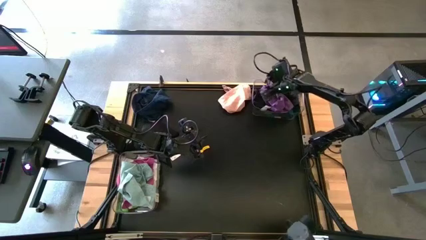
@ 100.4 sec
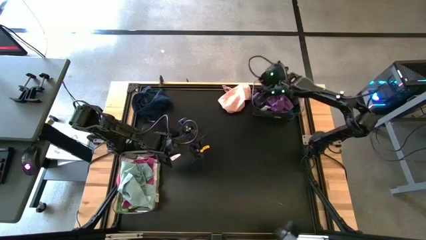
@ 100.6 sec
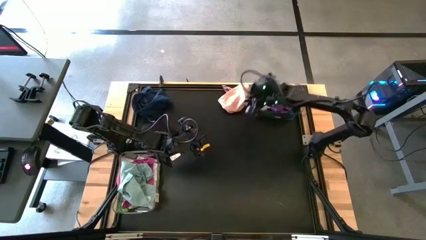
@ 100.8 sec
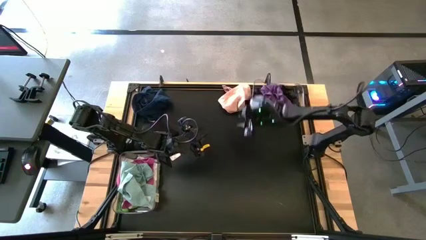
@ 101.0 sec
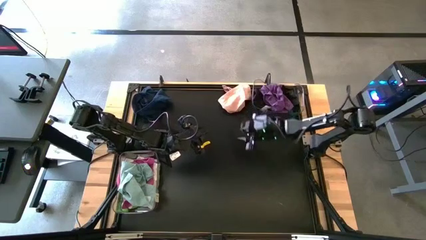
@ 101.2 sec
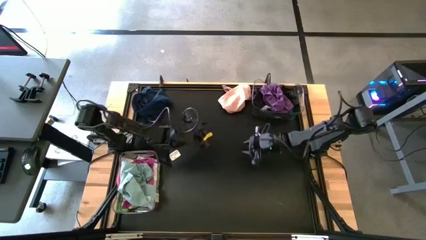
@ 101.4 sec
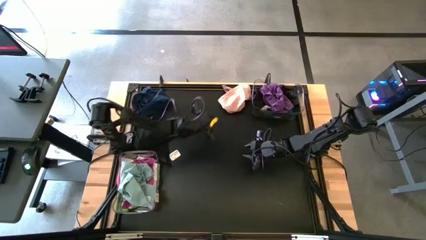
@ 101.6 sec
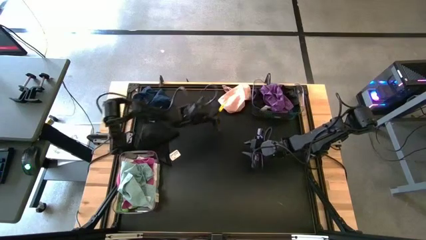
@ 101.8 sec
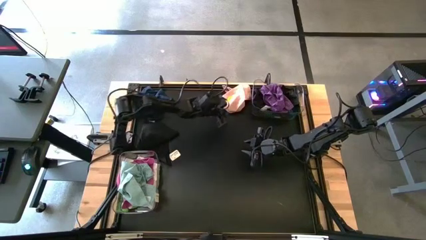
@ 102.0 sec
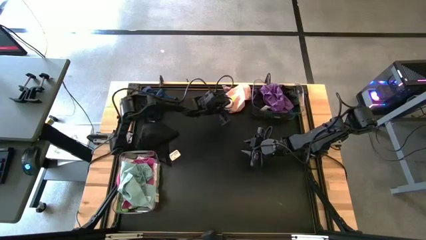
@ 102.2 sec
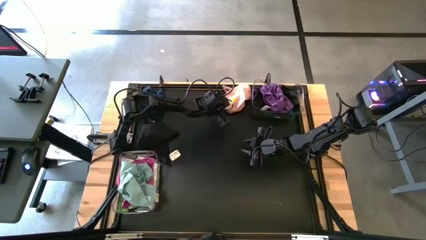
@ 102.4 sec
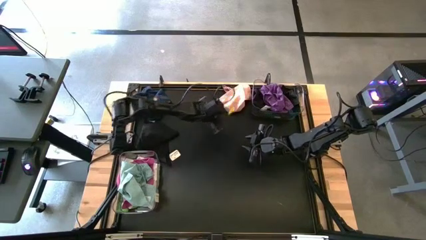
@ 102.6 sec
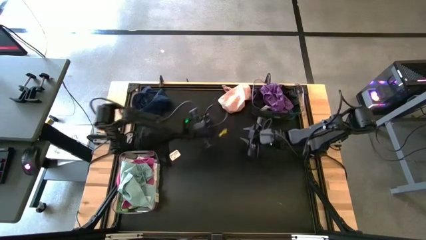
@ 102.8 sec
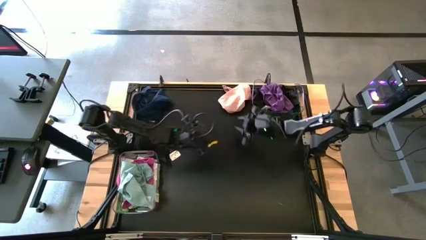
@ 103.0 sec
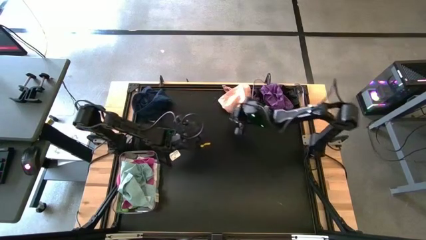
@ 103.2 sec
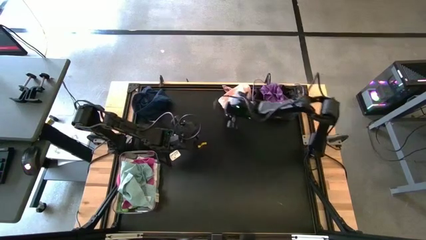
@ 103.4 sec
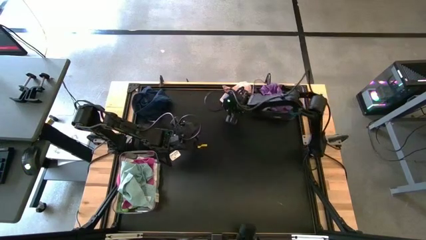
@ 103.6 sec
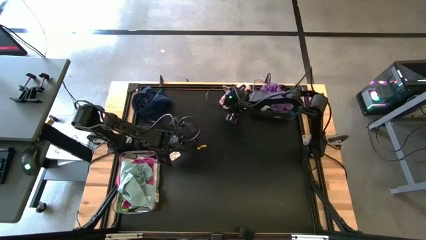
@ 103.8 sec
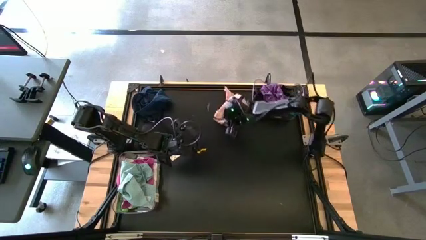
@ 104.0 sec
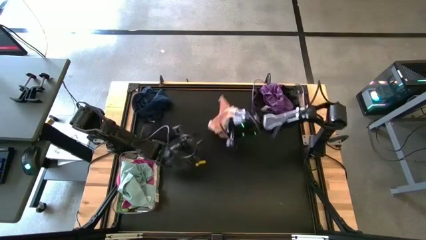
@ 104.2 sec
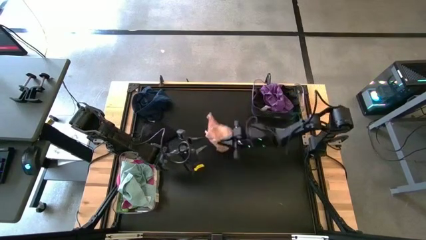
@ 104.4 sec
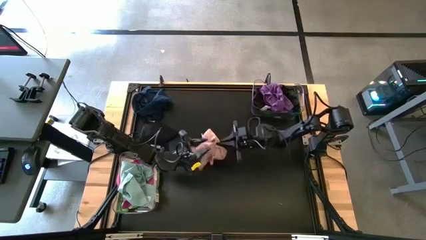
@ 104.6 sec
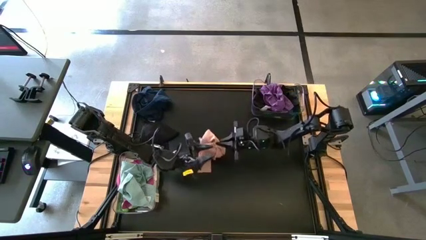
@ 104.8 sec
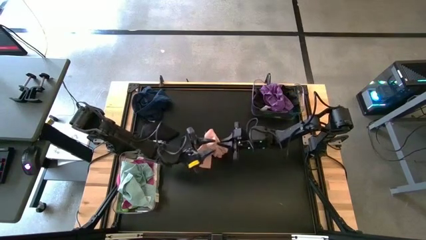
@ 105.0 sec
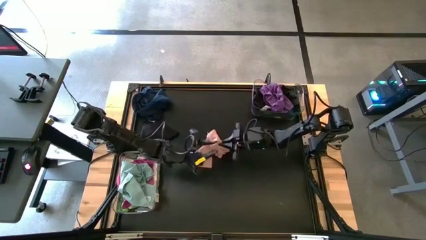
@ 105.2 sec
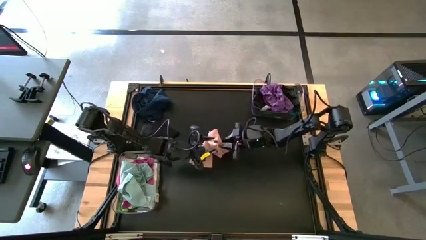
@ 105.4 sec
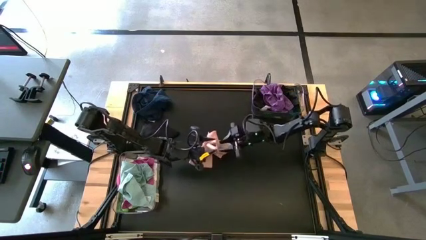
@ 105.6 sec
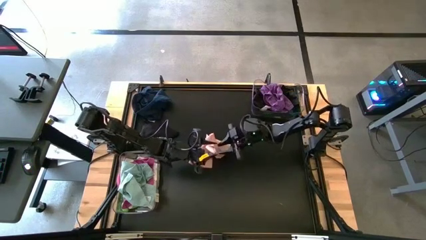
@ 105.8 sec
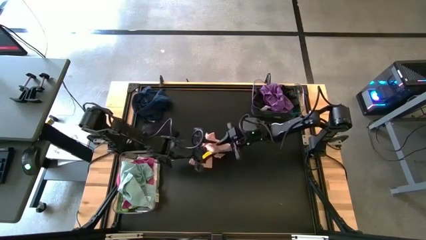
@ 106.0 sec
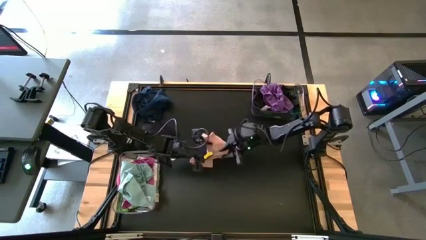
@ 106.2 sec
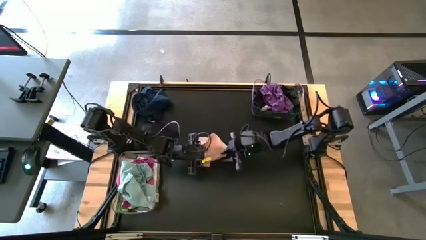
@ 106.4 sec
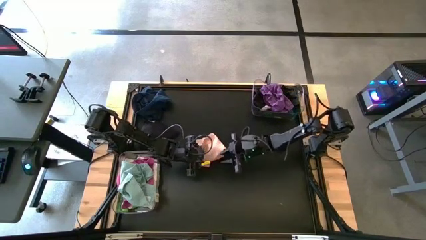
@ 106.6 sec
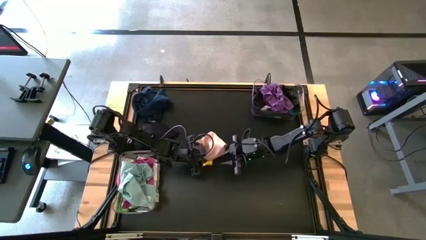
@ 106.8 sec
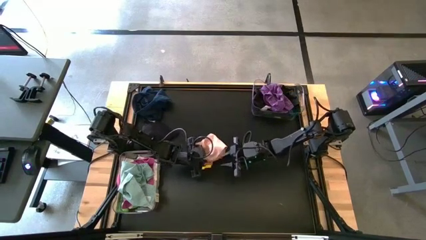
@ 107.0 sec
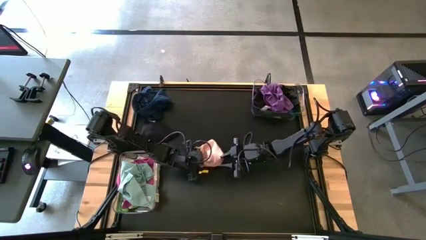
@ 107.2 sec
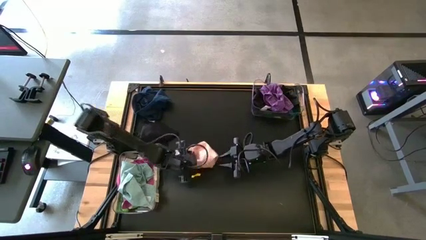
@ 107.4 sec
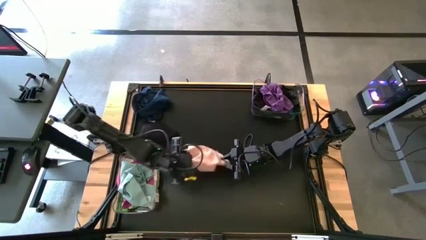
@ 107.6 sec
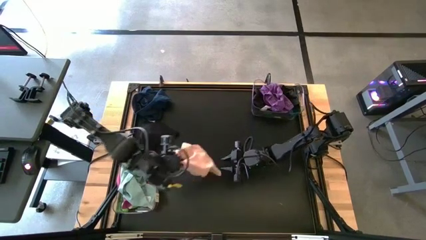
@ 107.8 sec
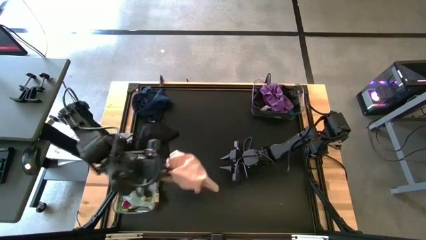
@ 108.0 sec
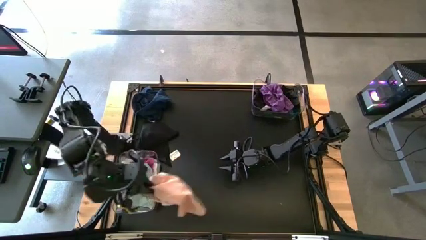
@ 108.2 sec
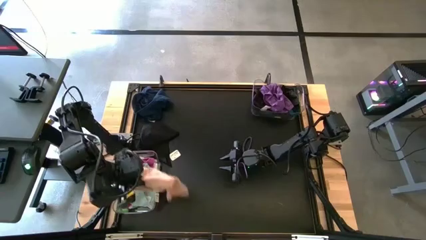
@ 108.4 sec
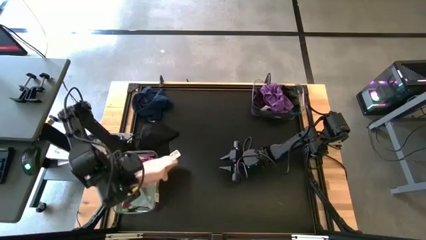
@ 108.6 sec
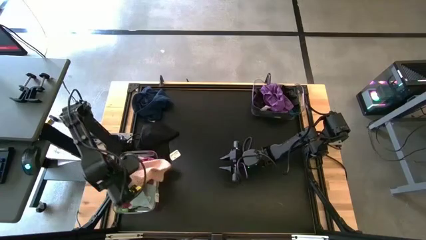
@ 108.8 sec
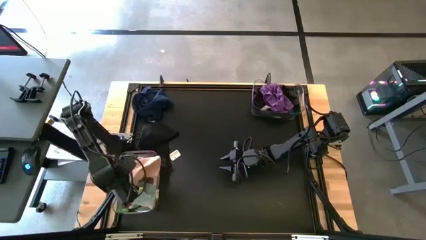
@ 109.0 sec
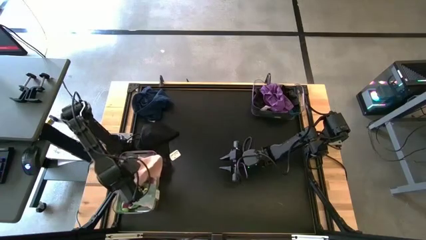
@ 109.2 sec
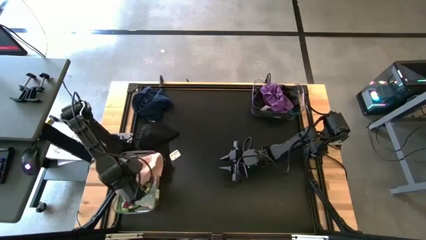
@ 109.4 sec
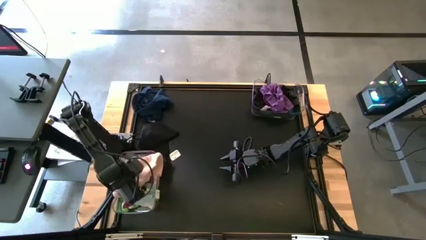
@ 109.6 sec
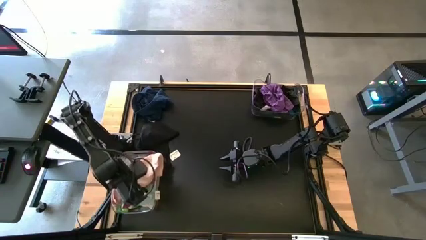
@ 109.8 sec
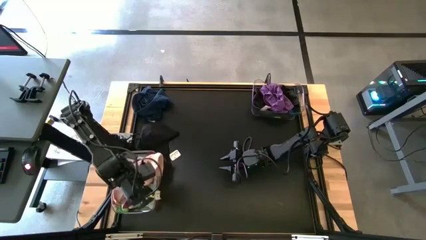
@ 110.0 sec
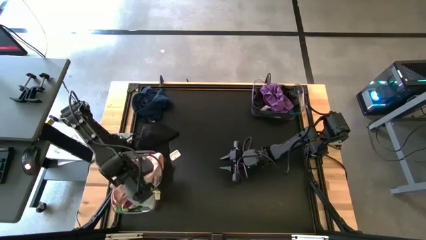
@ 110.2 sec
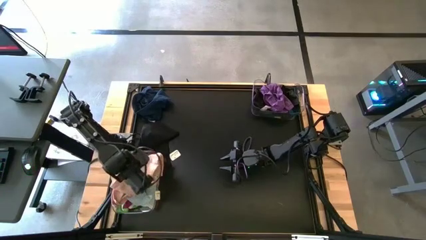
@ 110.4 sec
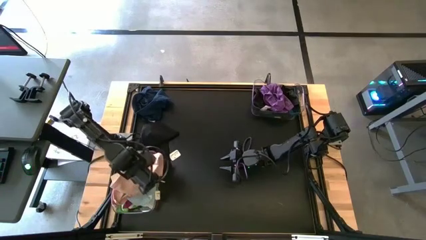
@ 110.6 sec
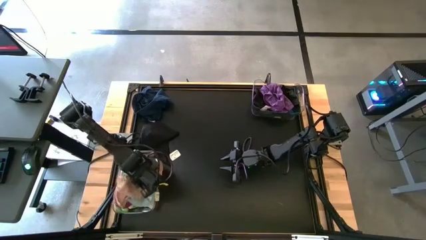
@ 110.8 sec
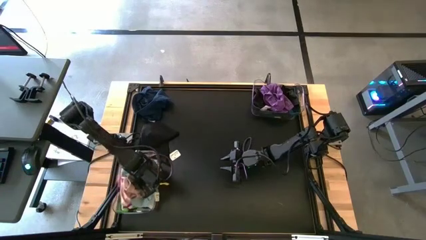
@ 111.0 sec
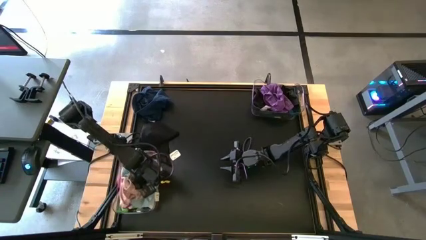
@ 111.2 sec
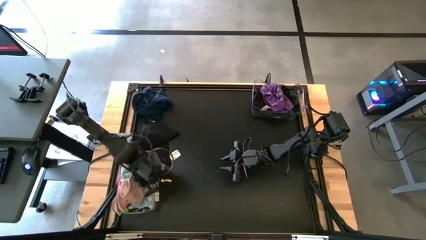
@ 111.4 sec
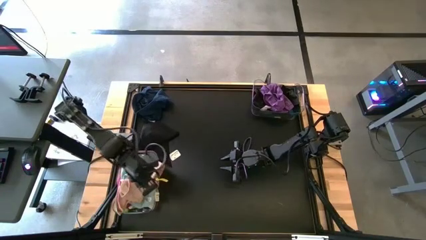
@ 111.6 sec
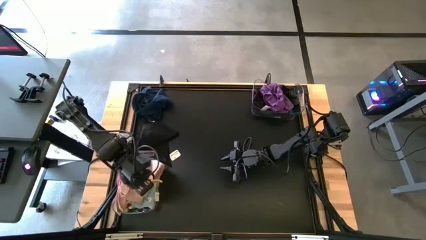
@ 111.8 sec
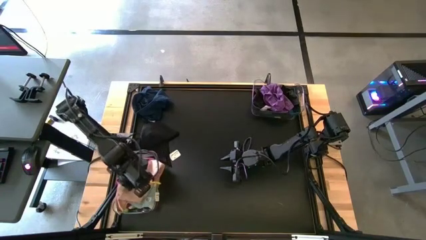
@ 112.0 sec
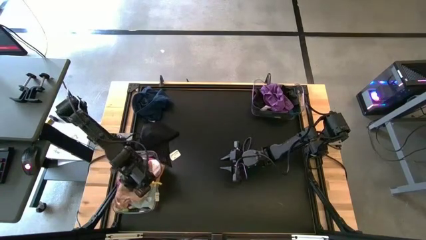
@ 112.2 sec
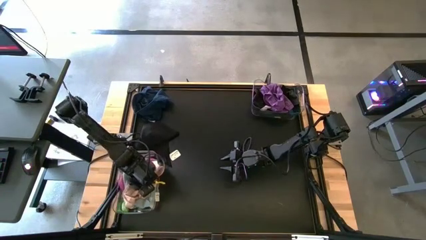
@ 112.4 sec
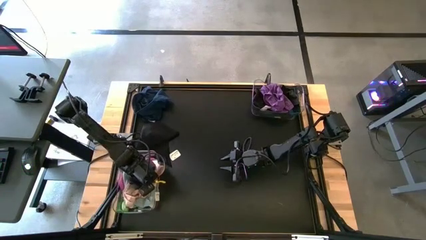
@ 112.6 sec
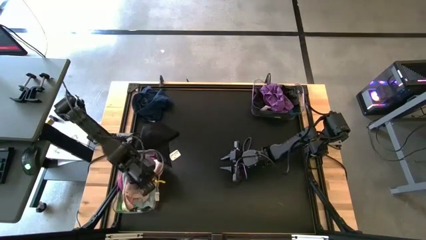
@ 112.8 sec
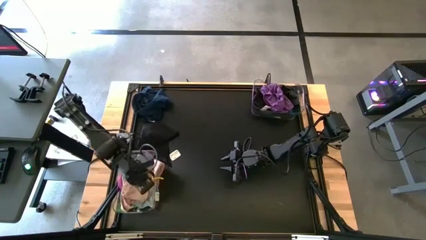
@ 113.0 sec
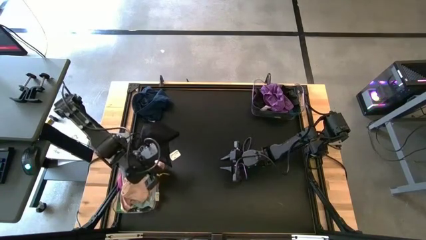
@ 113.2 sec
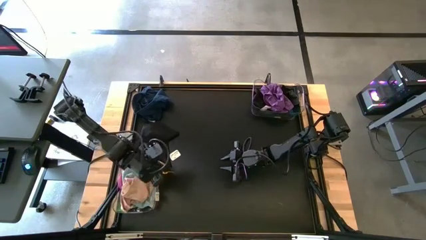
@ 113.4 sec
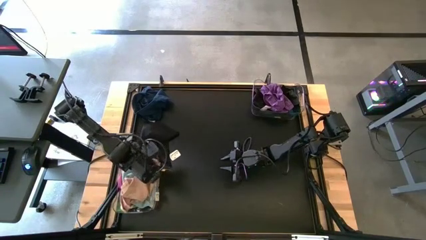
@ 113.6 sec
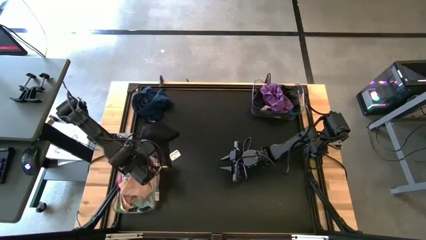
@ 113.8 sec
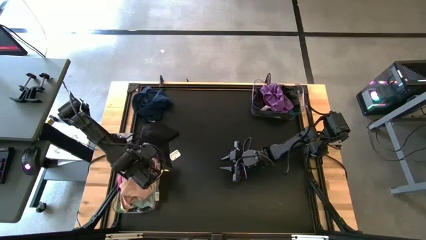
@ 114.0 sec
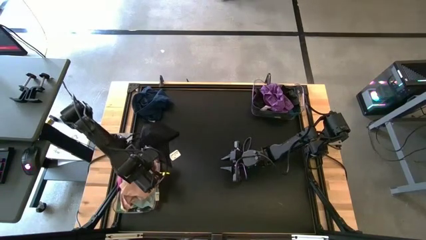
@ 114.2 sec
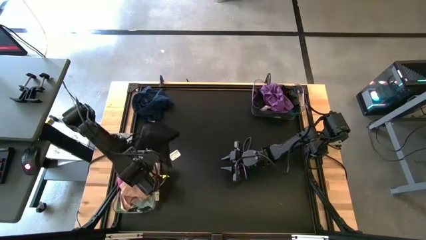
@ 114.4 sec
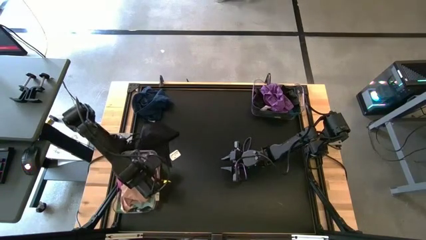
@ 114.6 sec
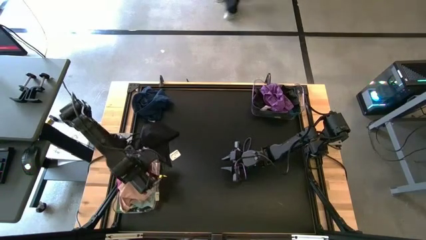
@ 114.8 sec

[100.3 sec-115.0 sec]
Task: Sort towels by color in basket
Put the light pink towel into the bottom transparent bin
